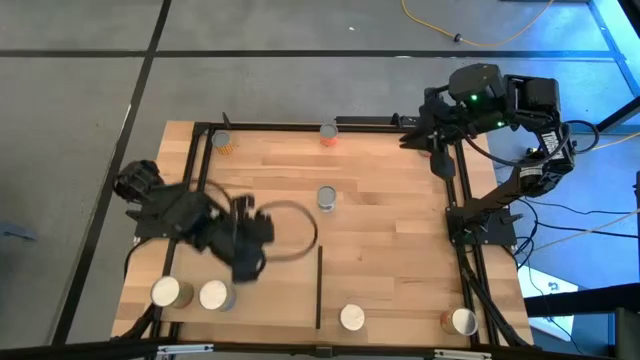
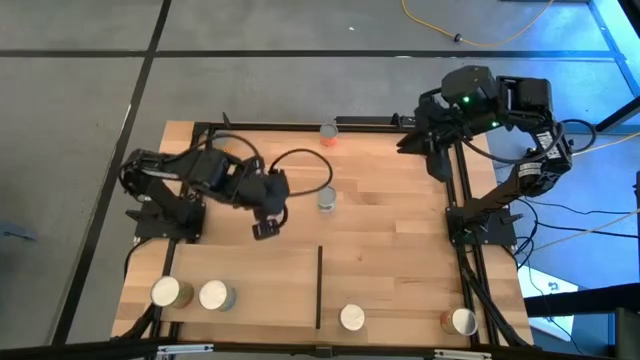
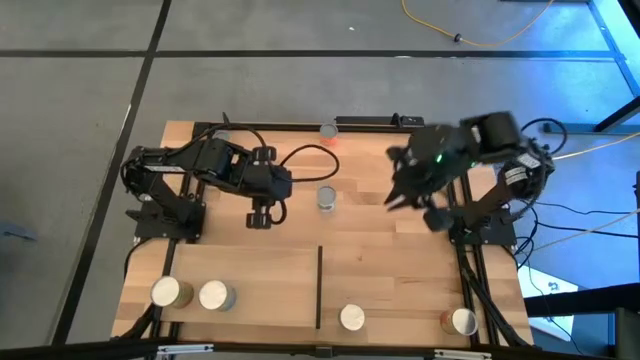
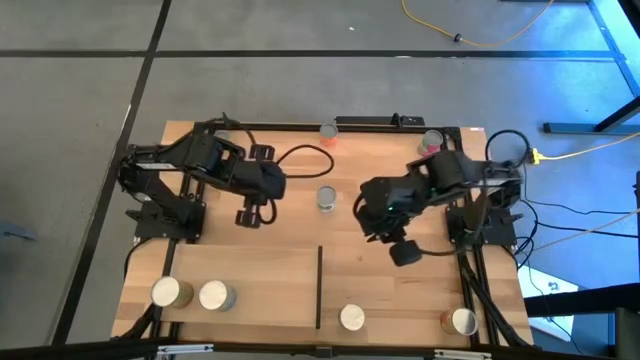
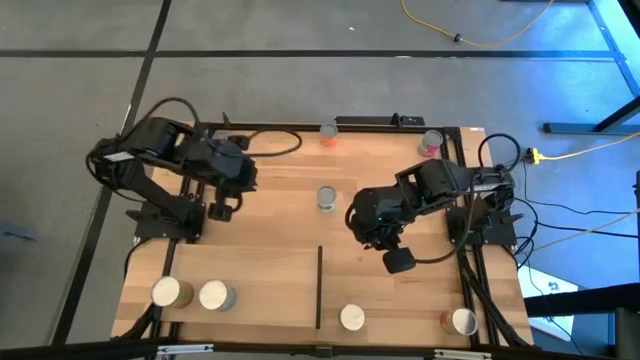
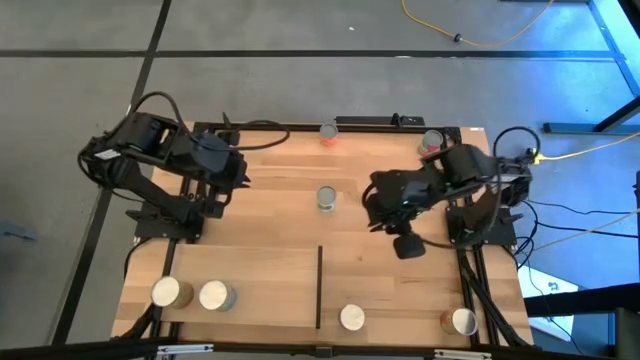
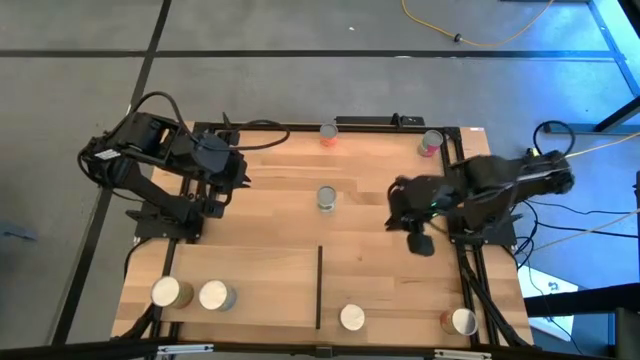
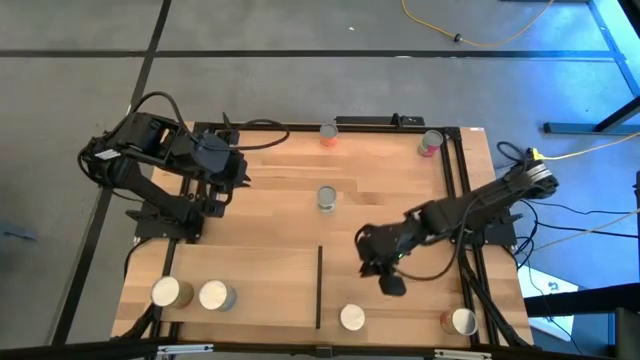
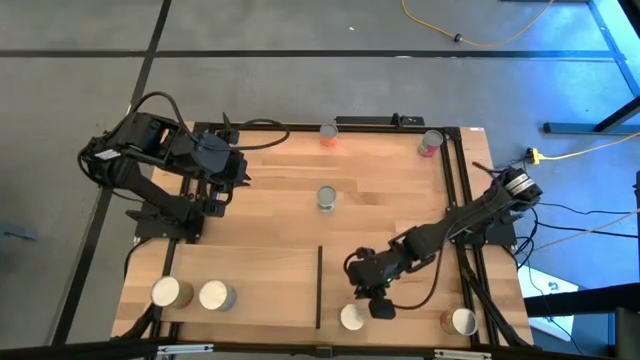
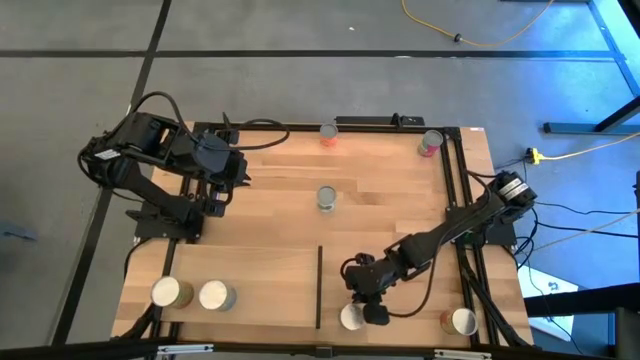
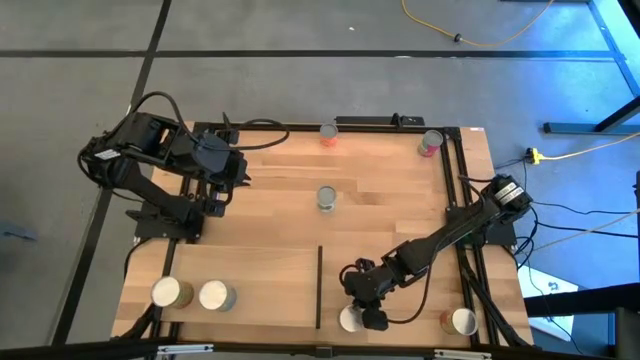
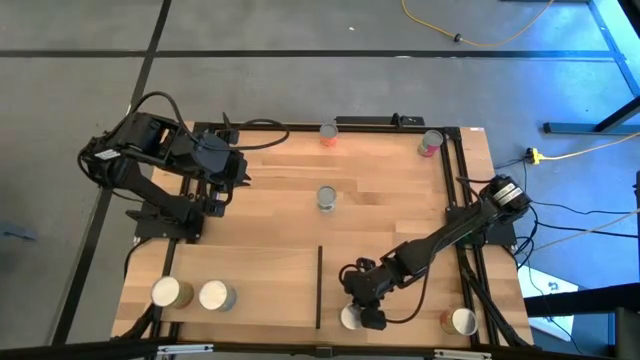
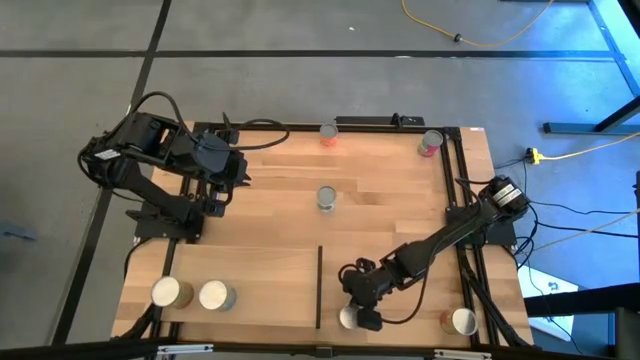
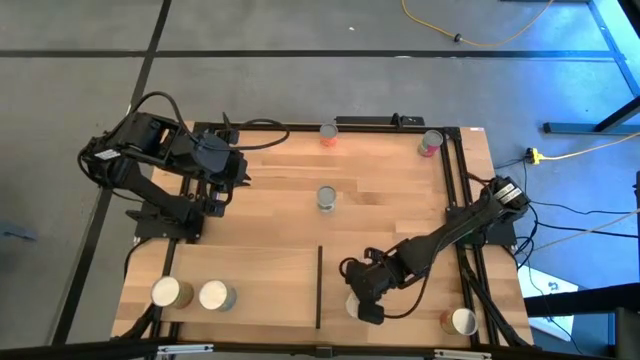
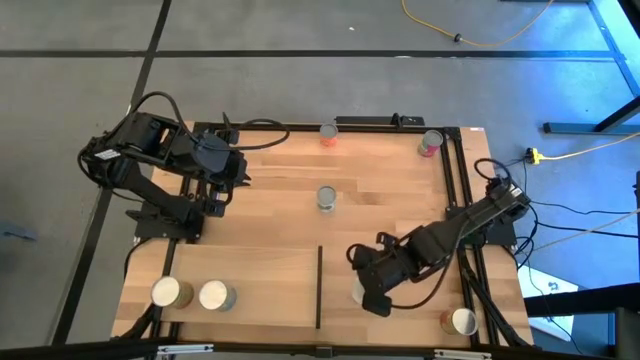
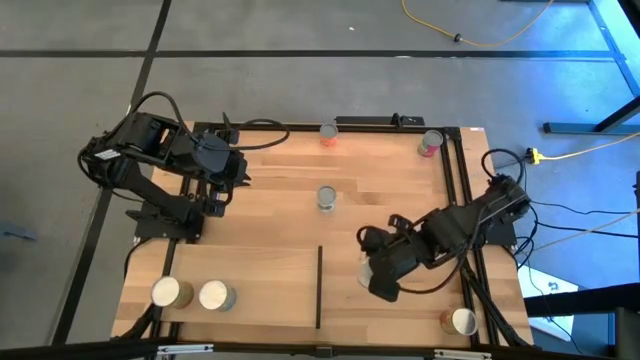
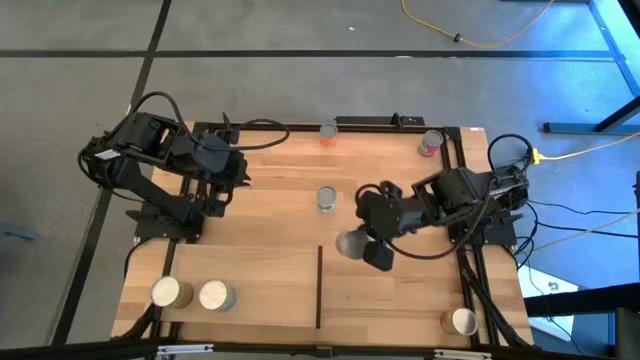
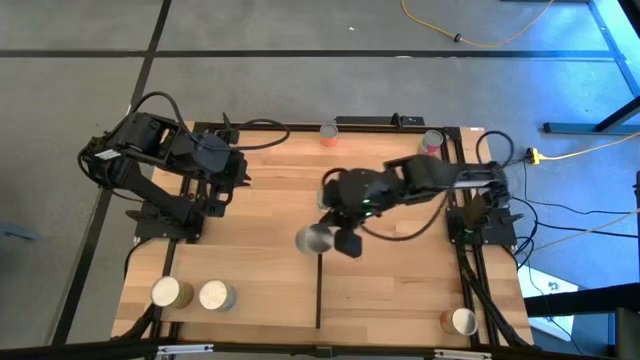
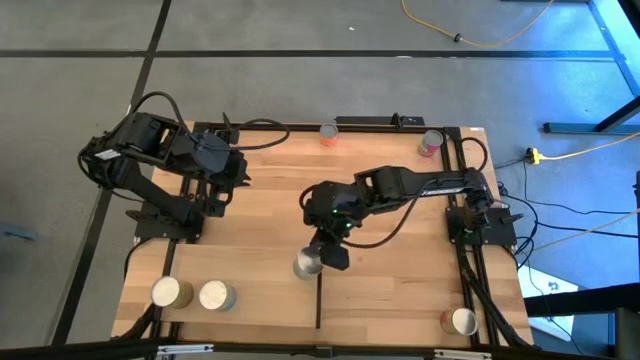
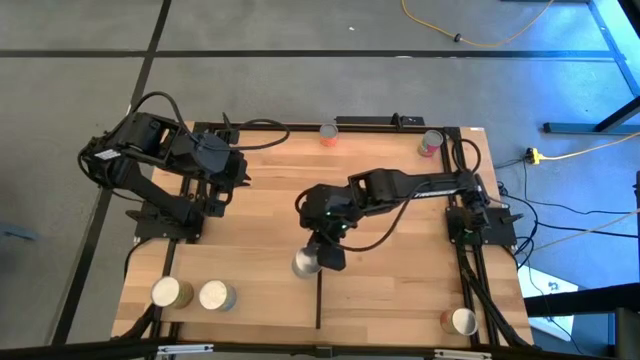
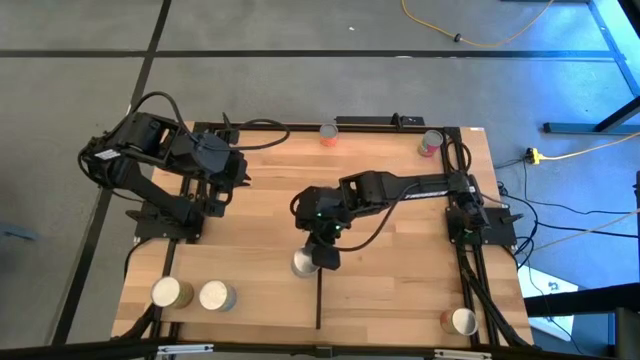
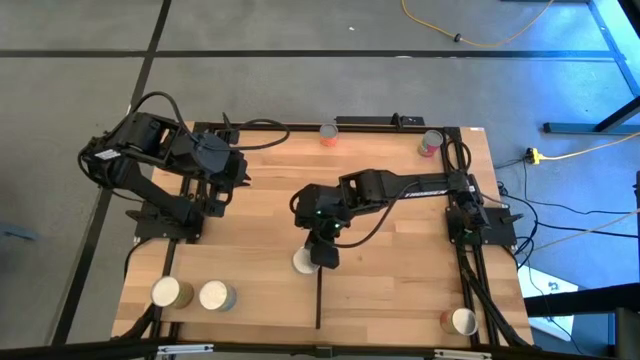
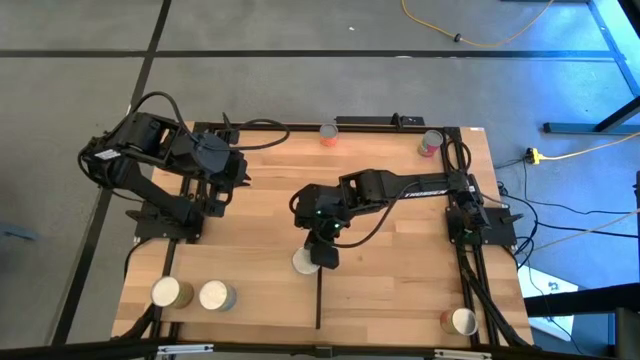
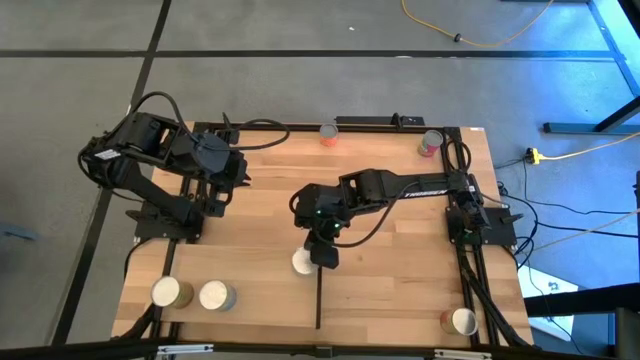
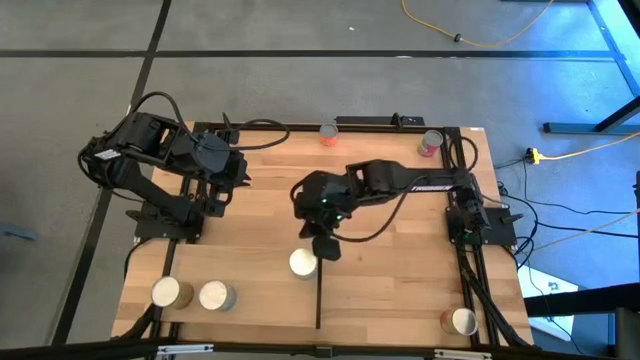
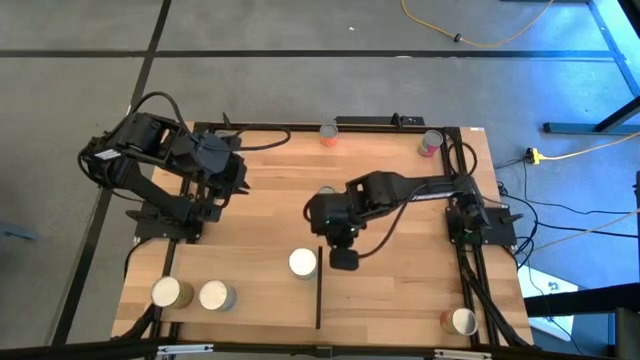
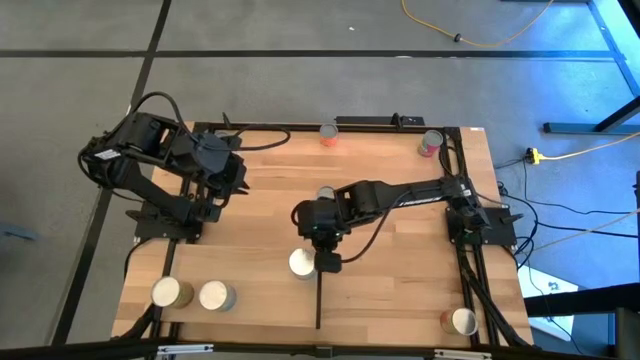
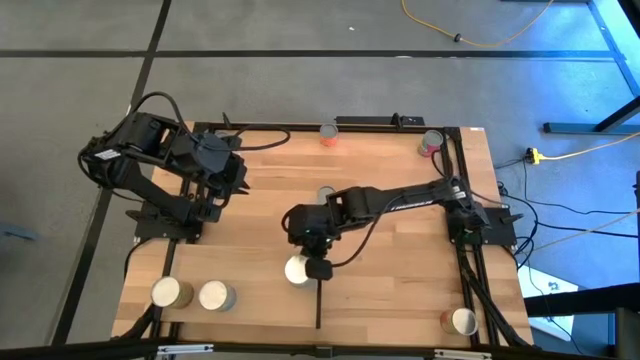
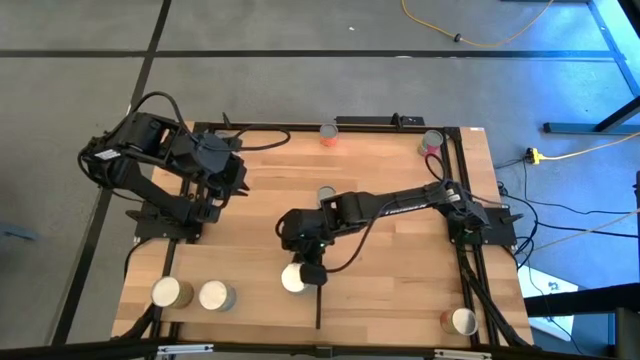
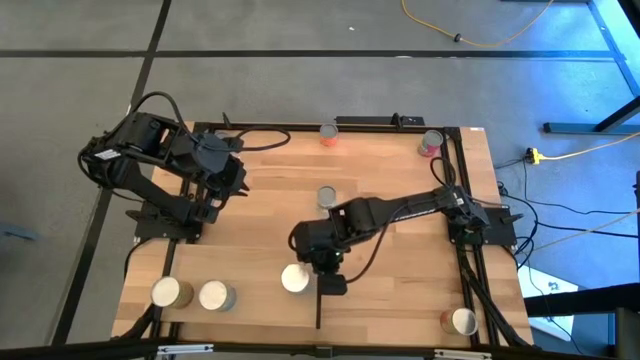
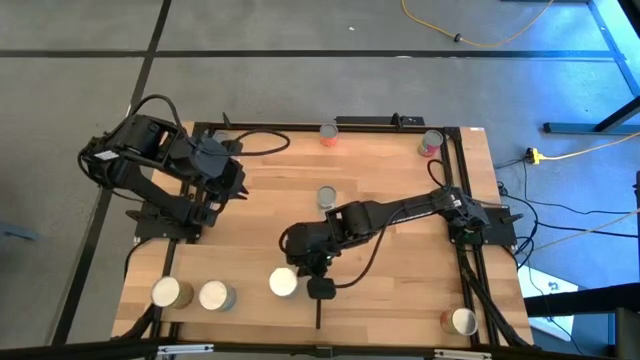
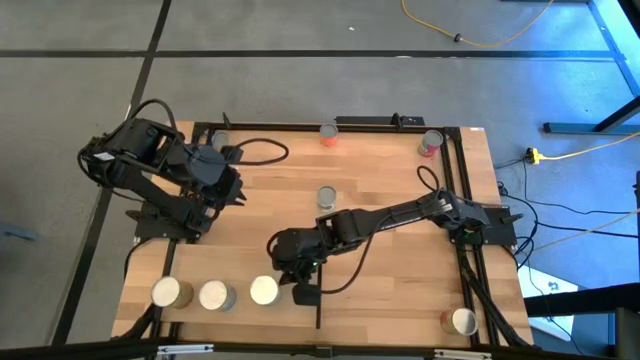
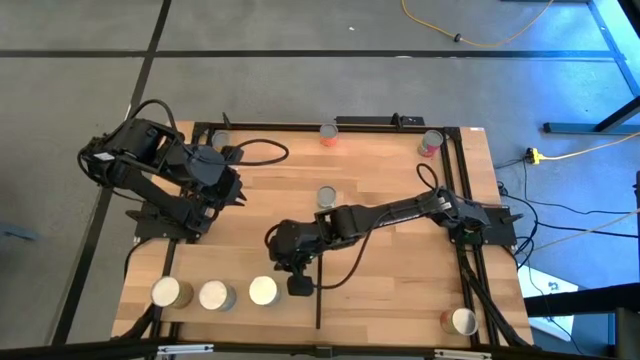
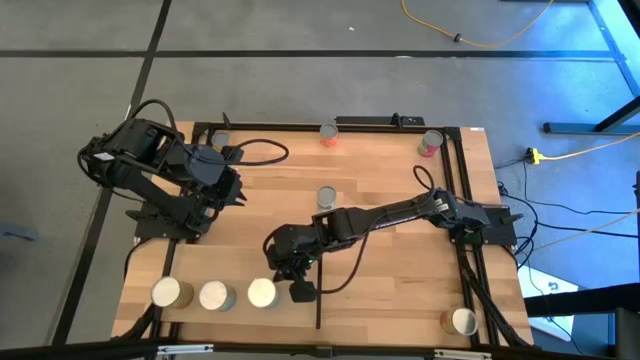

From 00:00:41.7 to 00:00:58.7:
Task: Pick and place cans onto a shelf
Put the canned cherries on the shelf

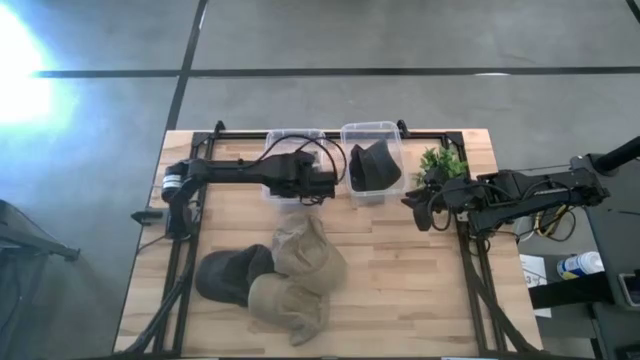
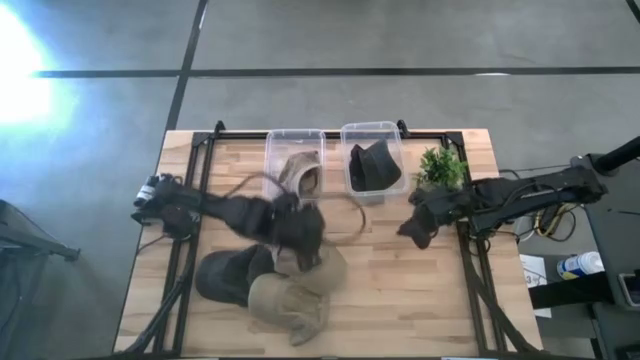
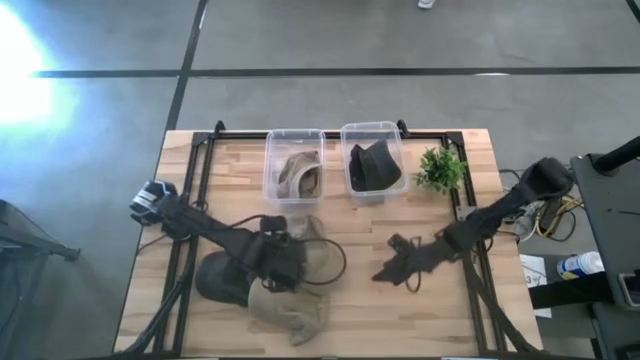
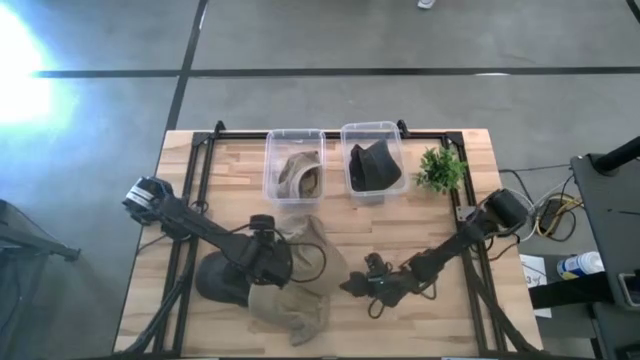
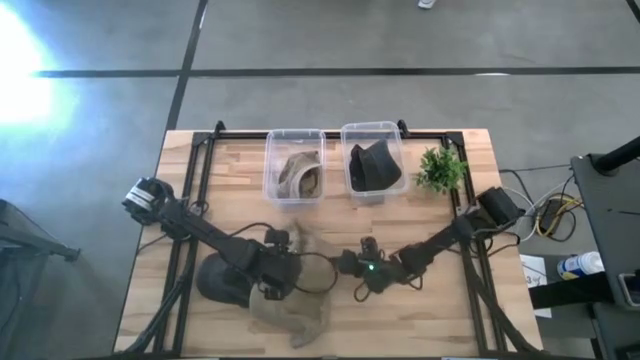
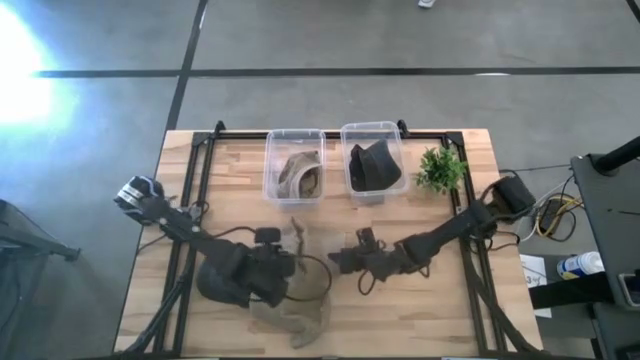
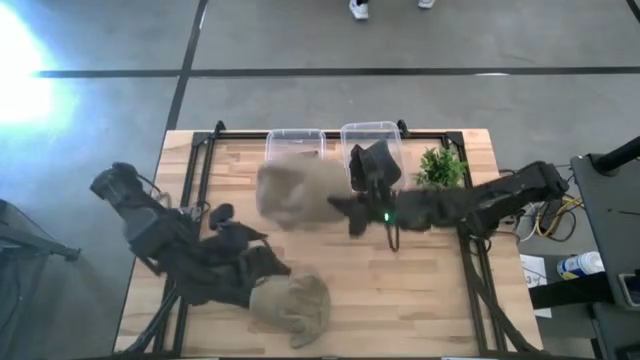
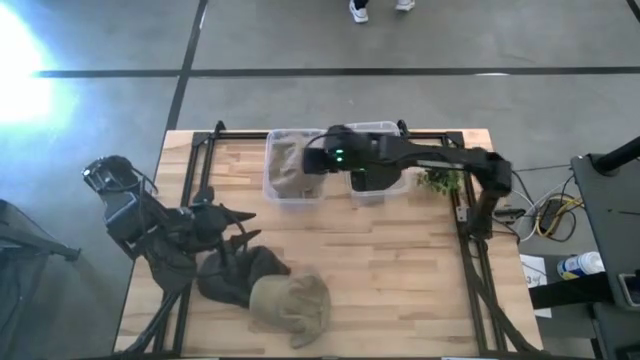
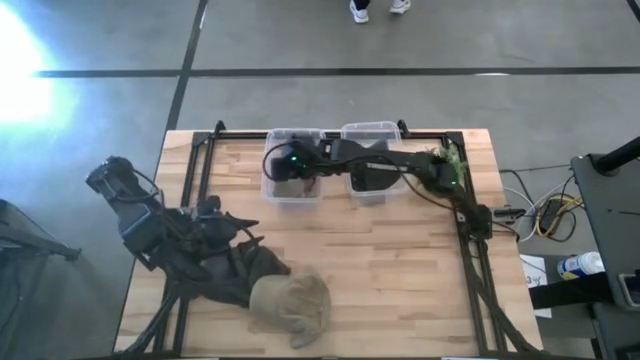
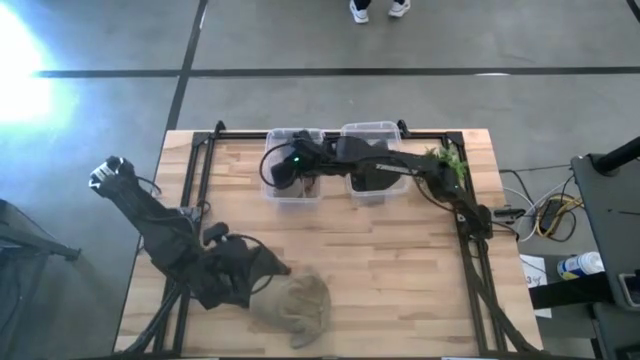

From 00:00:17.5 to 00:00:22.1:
Task: Pick & Place hat
Put the top brown cap into the left transparent bin
